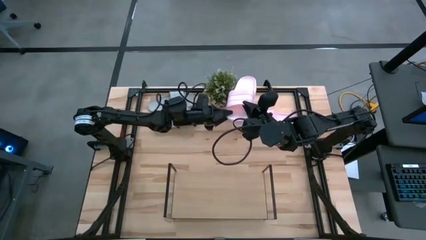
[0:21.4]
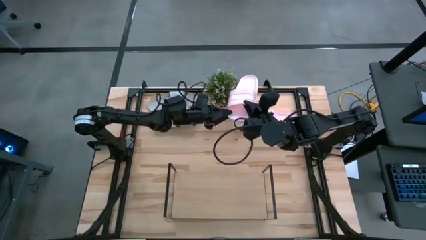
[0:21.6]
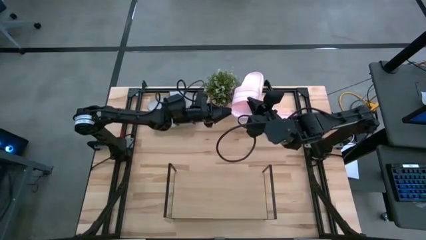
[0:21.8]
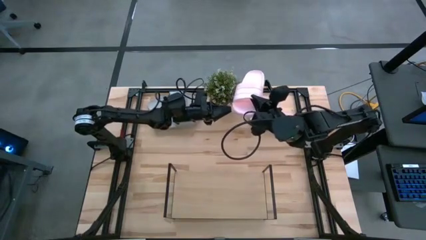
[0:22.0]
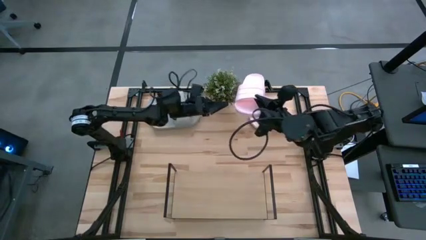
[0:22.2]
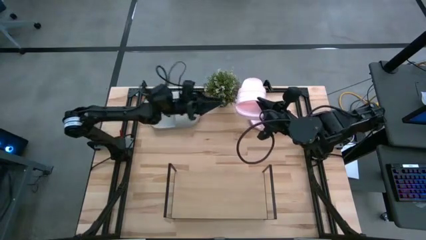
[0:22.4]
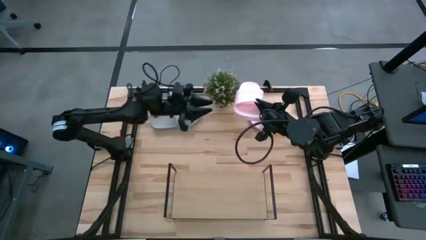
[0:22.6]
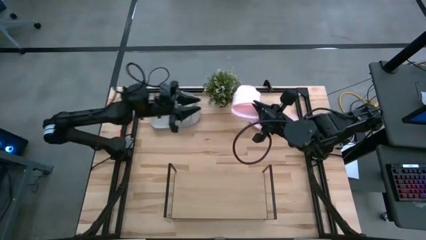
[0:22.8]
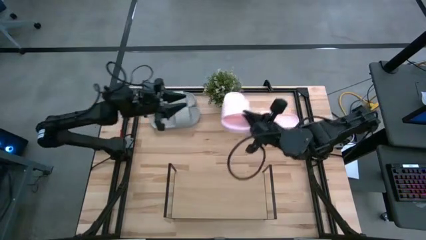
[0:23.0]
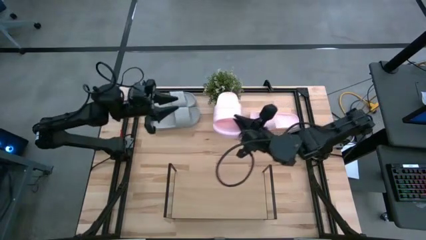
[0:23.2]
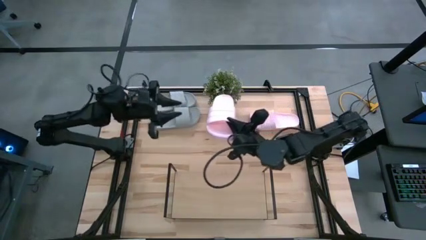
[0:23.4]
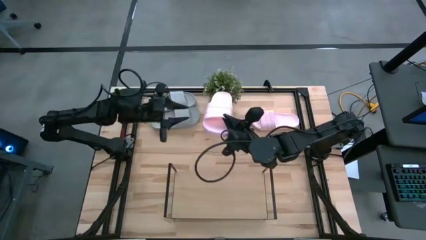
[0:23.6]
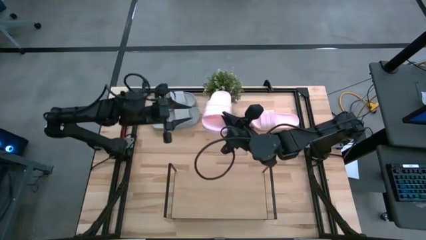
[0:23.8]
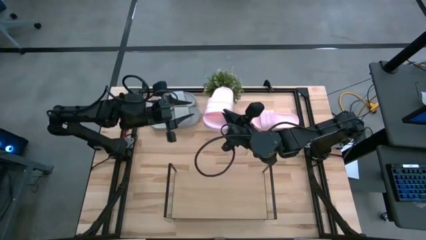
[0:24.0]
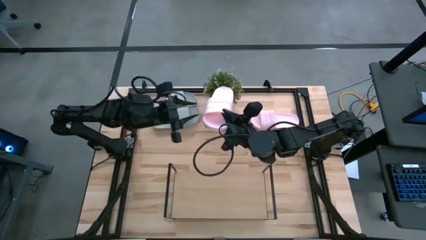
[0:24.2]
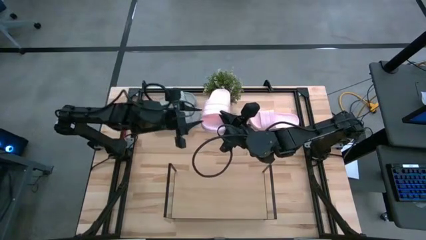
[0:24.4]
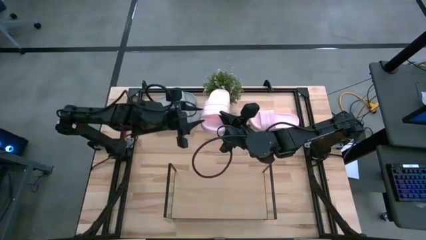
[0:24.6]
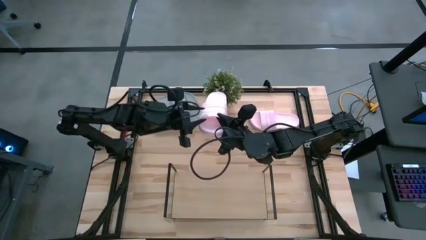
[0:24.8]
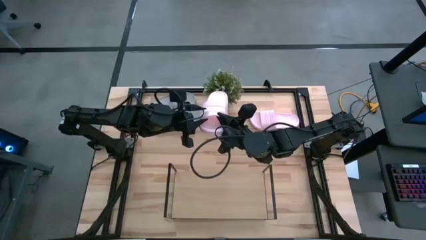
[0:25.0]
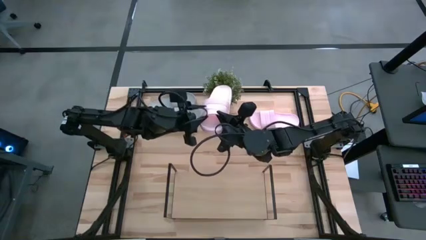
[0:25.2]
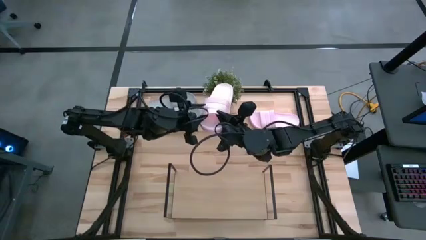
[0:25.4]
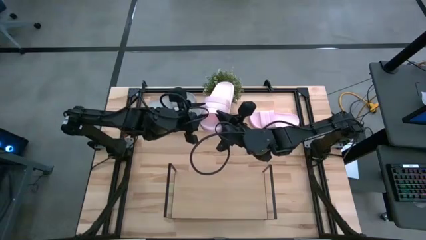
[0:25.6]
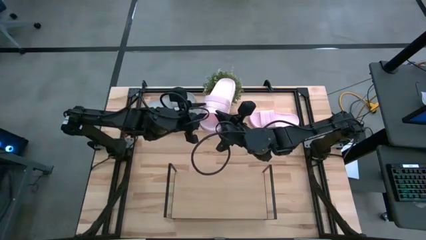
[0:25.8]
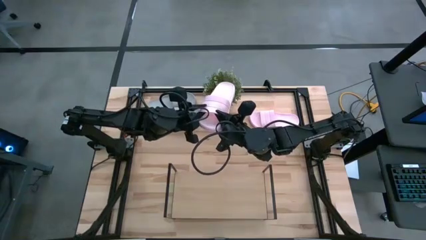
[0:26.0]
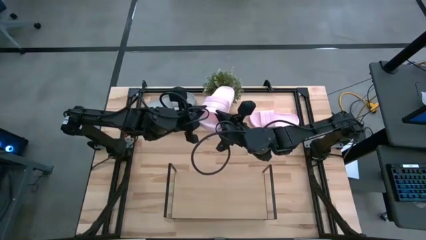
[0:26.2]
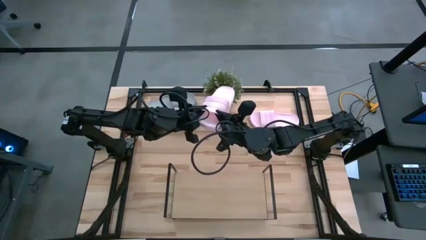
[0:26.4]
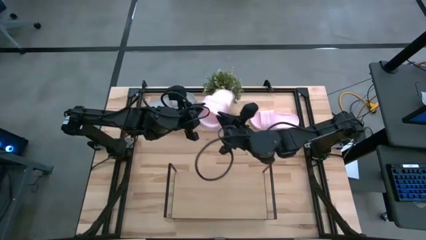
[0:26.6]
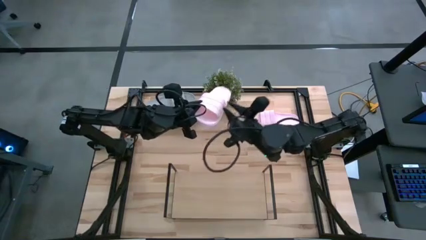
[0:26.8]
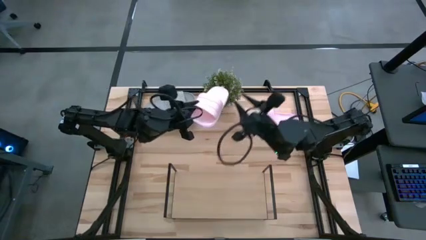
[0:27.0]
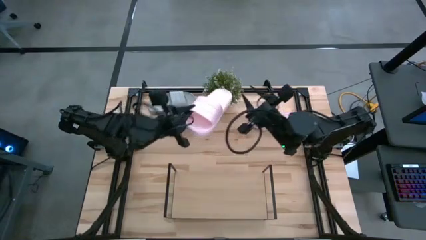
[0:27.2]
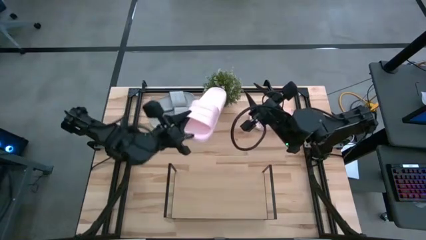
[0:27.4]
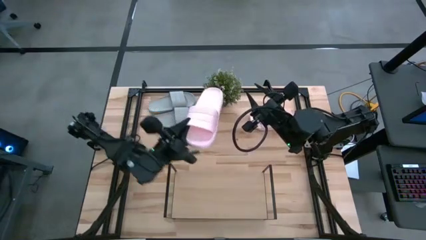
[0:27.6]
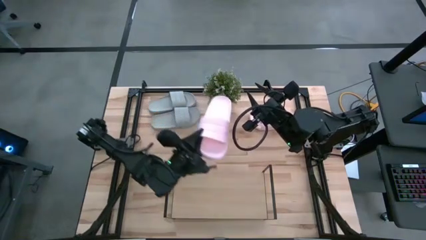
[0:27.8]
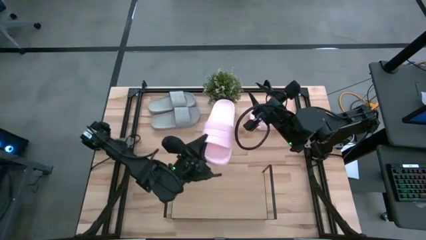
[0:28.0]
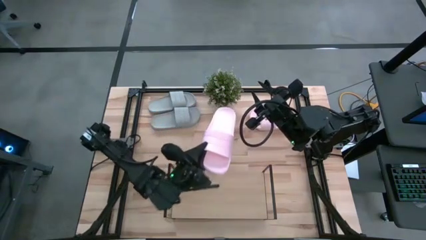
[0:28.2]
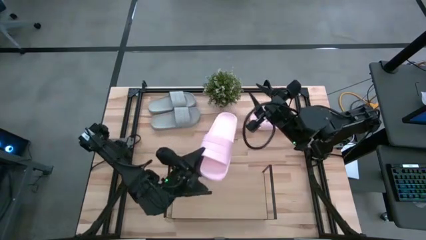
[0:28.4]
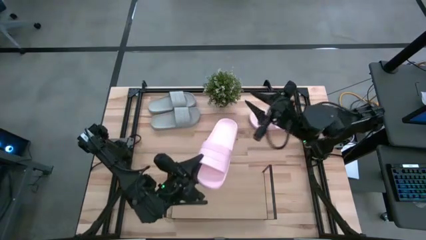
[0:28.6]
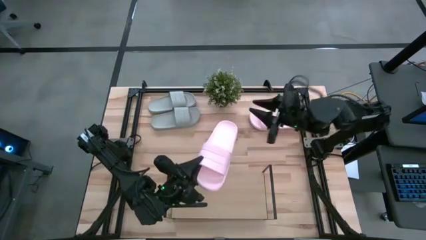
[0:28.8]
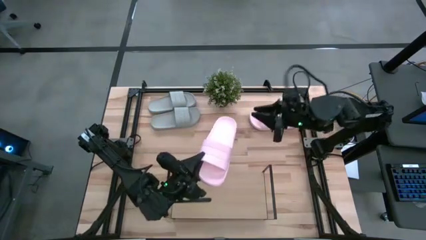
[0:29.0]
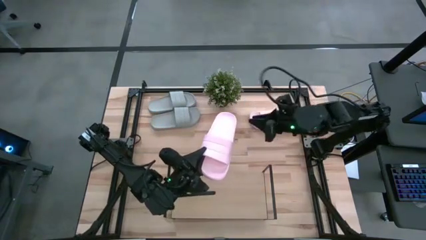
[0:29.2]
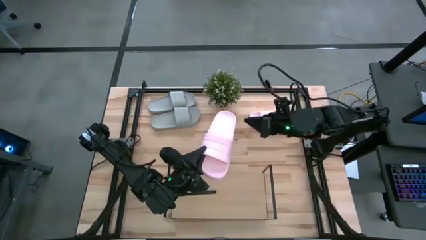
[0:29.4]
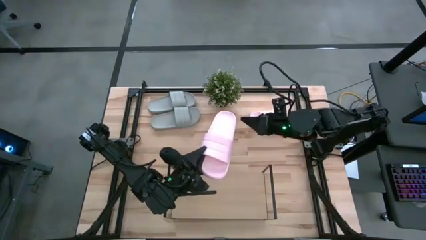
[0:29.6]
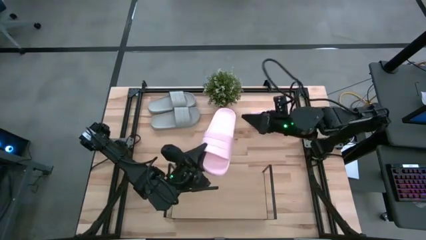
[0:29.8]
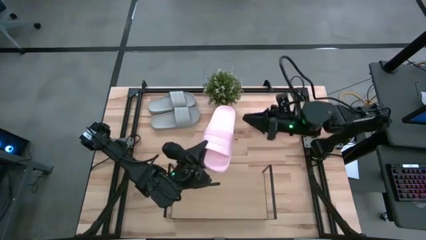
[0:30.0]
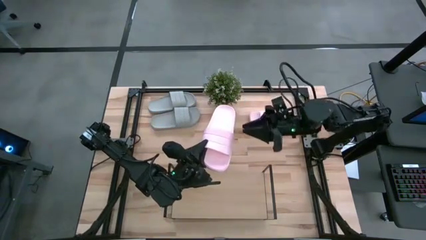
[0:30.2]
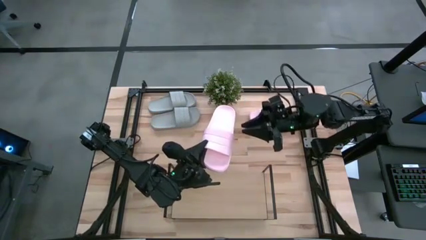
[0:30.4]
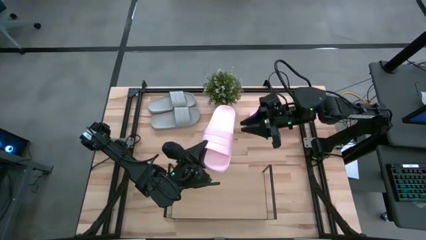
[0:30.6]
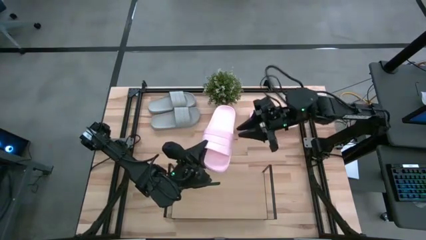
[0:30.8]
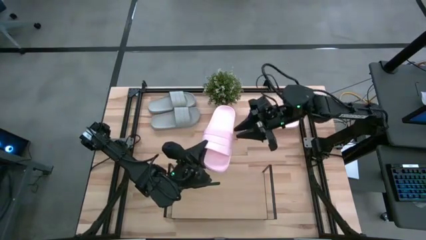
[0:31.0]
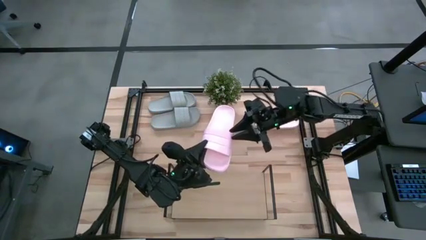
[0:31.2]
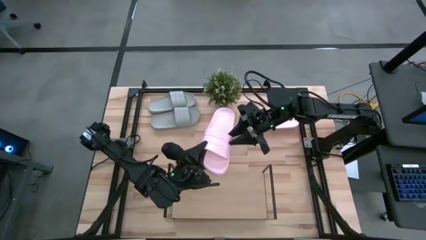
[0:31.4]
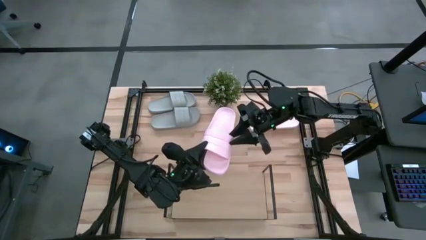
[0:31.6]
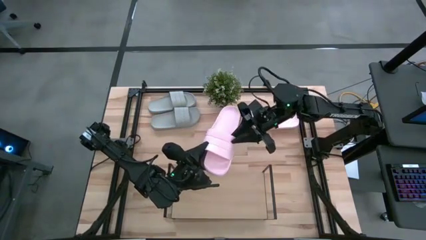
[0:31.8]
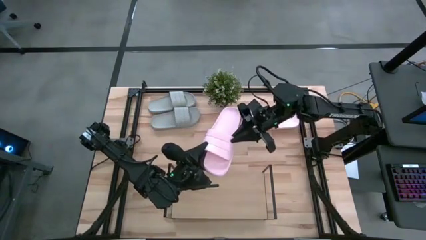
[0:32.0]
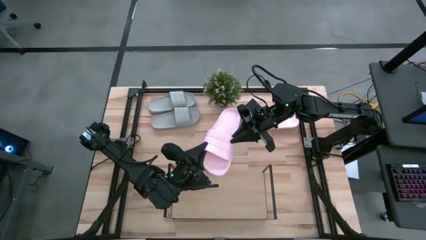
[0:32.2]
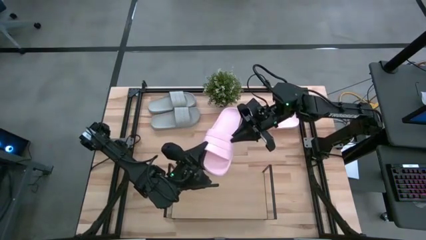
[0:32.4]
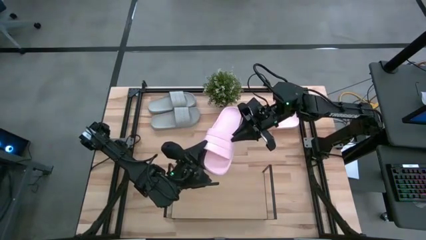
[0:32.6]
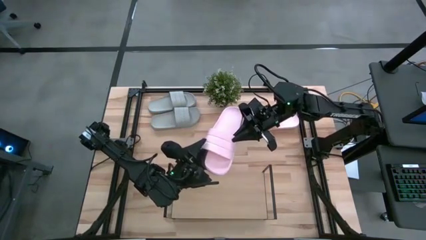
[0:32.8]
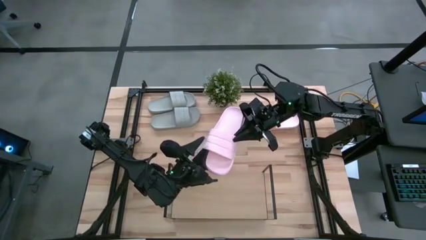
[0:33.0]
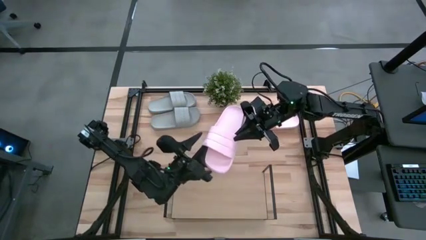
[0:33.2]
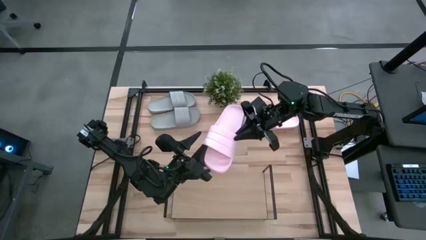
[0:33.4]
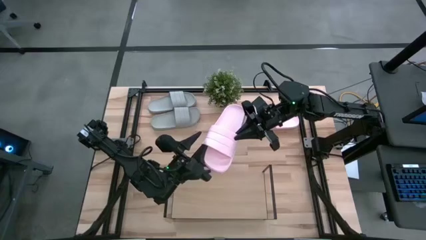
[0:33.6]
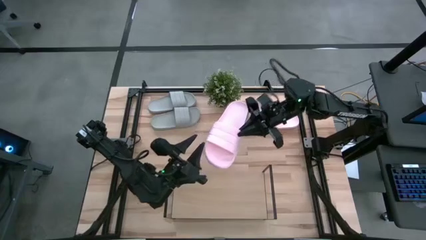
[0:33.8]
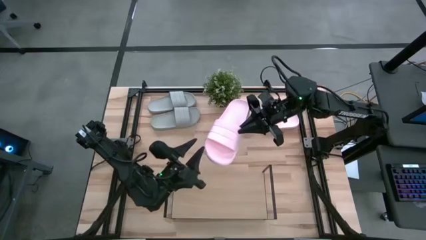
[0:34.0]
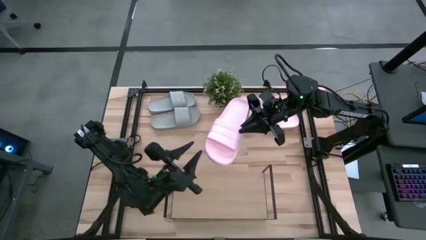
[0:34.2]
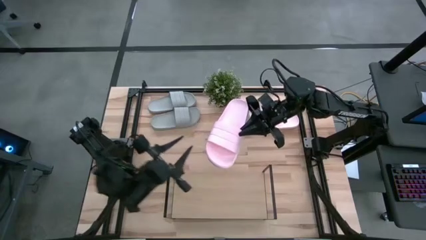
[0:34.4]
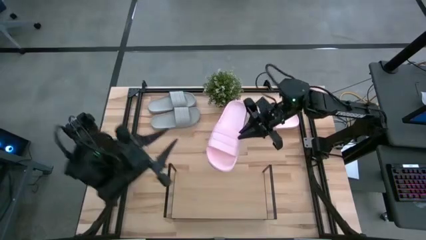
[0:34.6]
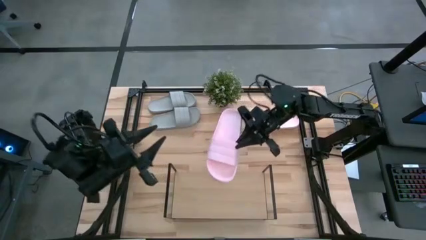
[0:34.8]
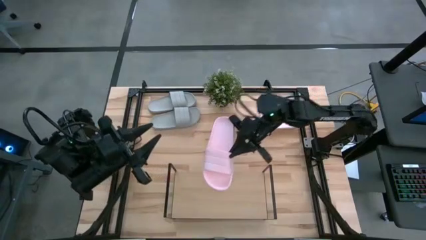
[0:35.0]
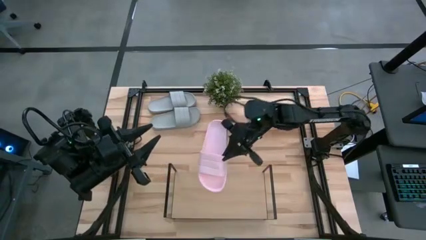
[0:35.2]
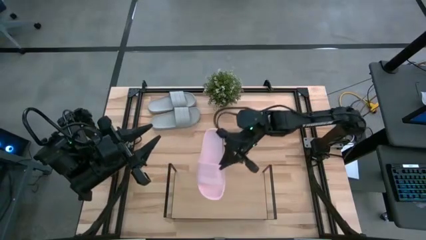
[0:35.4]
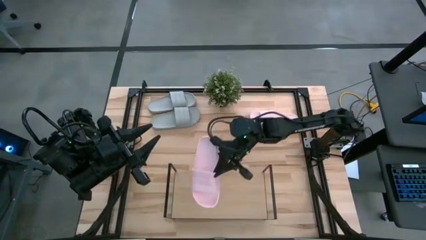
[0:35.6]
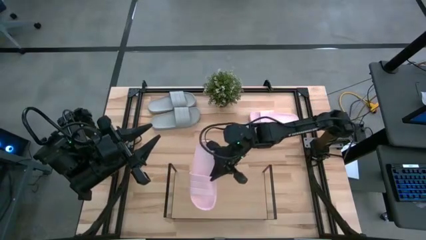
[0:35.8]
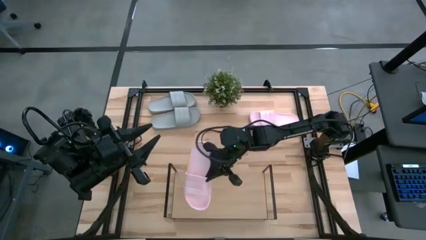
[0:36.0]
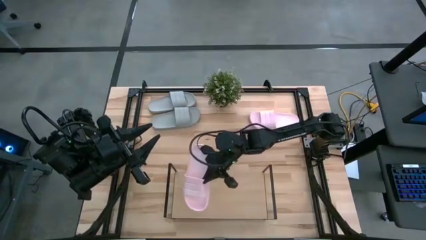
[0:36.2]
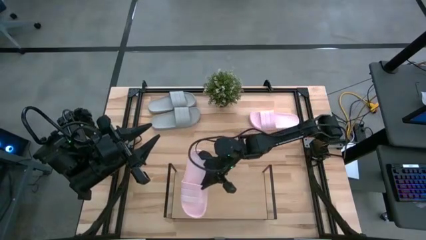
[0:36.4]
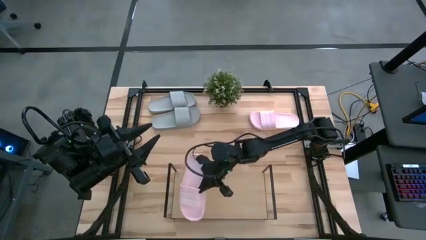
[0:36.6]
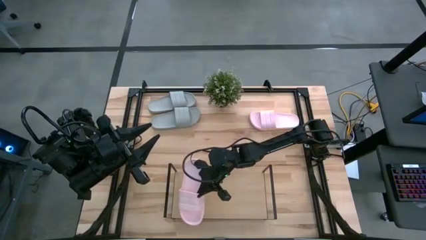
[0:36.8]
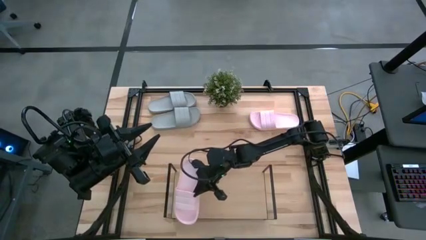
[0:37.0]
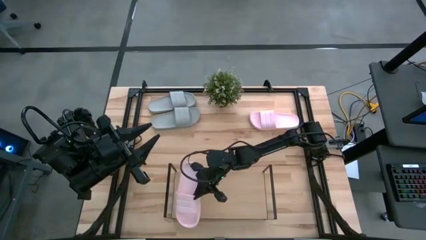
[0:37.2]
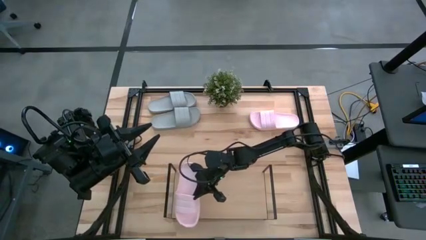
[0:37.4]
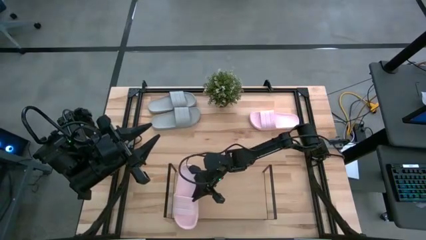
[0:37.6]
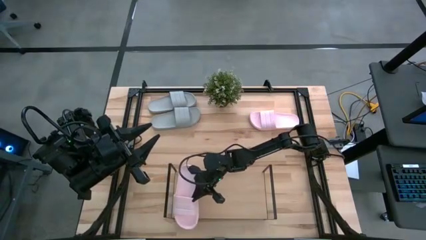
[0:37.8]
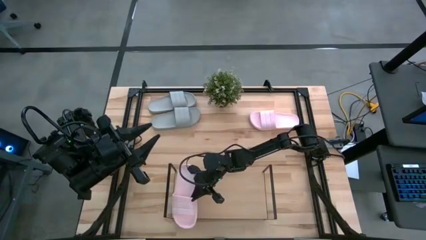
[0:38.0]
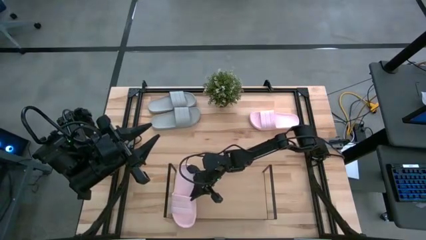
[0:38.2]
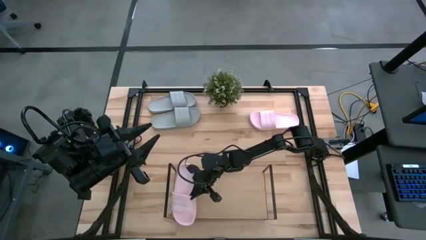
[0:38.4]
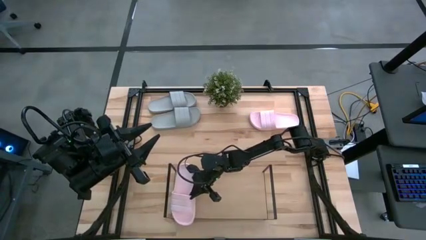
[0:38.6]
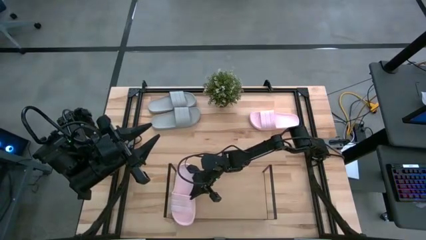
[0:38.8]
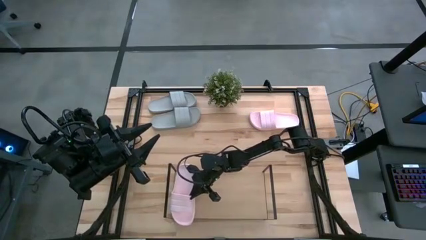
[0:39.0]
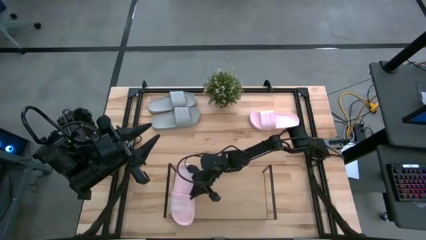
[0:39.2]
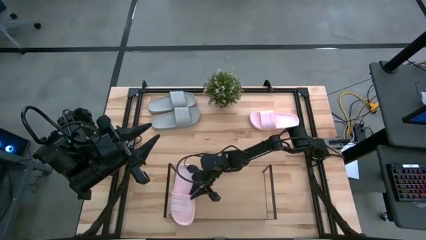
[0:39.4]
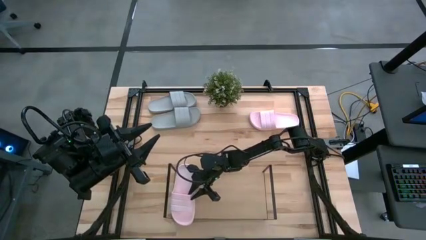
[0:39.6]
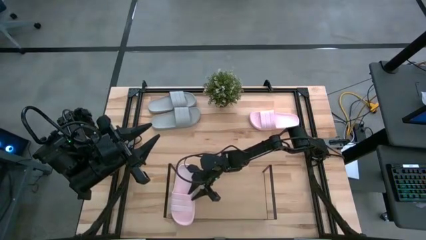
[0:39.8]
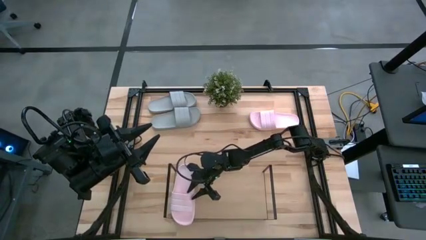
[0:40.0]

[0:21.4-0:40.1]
Task: Pick and place slides into the shelf
Put the top pink slide on the shelf
